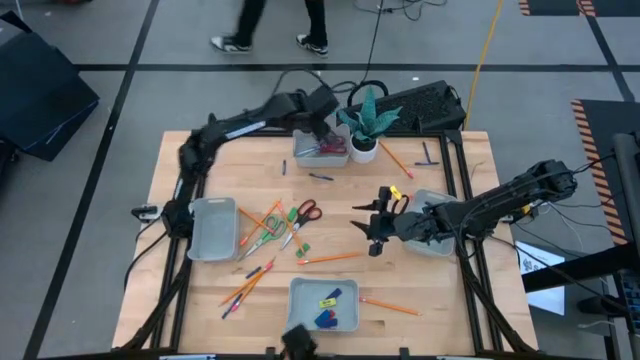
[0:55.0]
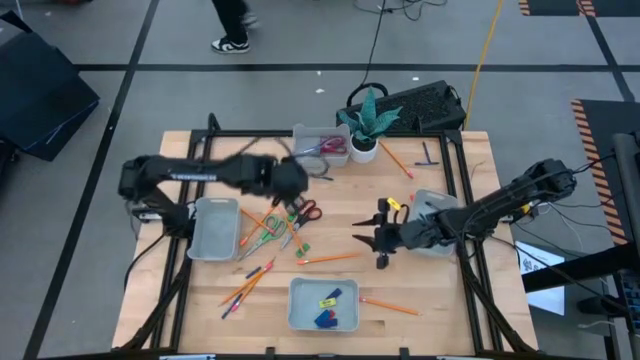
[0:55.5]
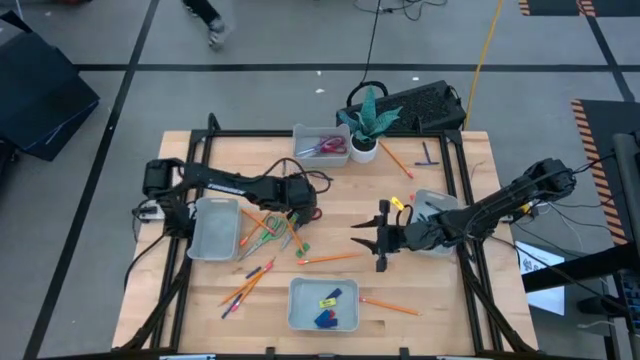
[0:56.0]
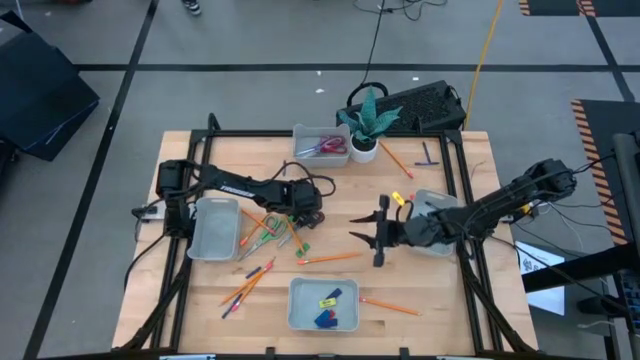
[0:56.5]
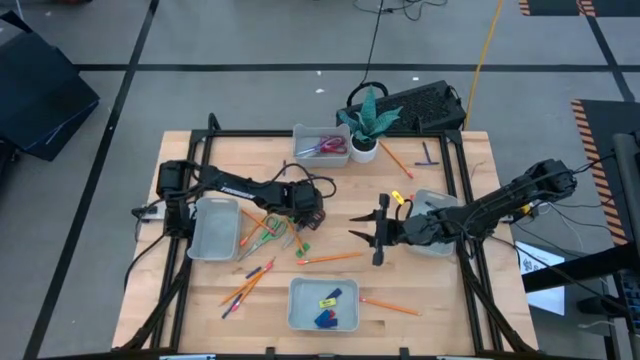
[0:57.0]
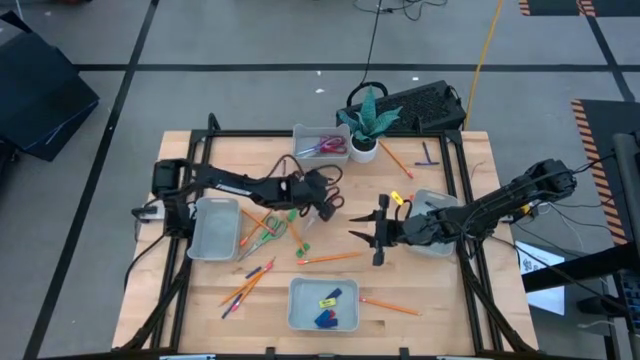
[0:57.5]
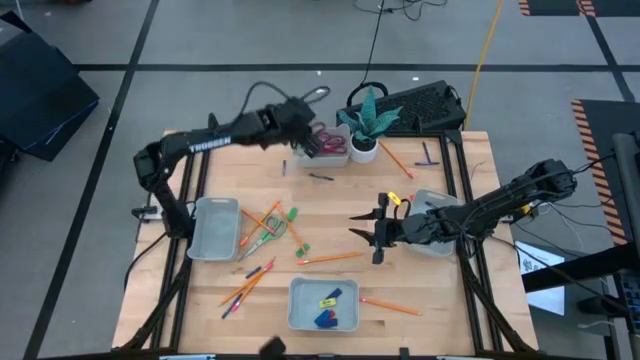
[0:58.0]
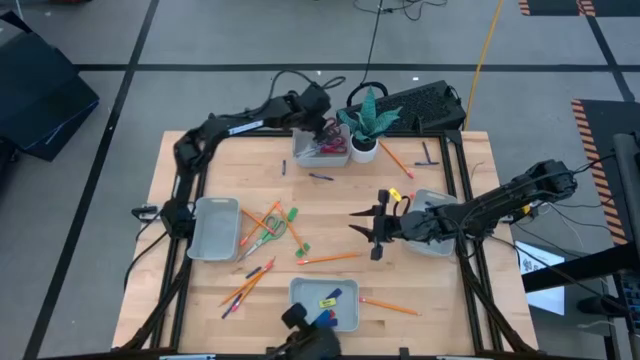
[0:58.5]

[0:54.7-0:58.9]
Task: Sort crayons/erasers/pens/pencils in bins
Put the black scissors into the top gray bin

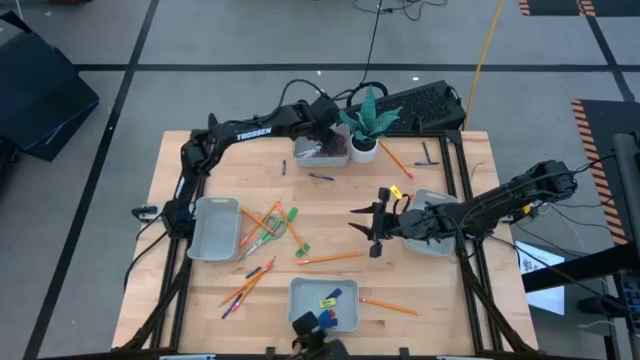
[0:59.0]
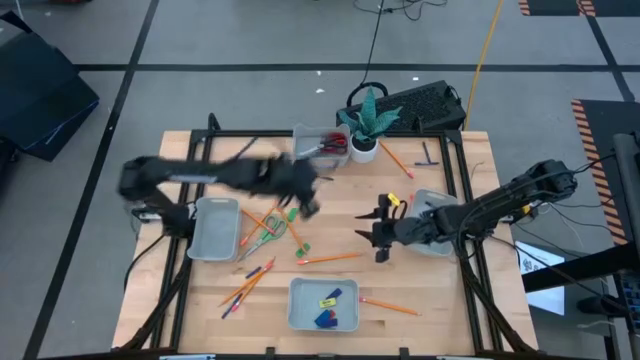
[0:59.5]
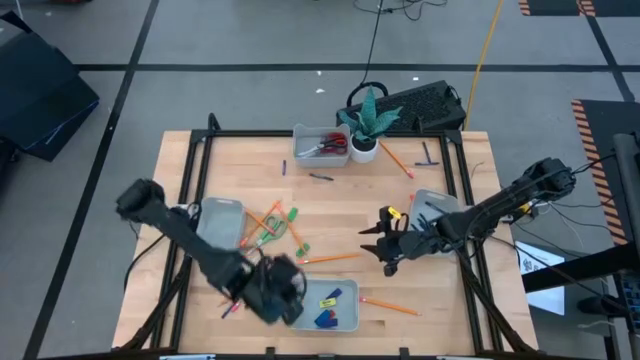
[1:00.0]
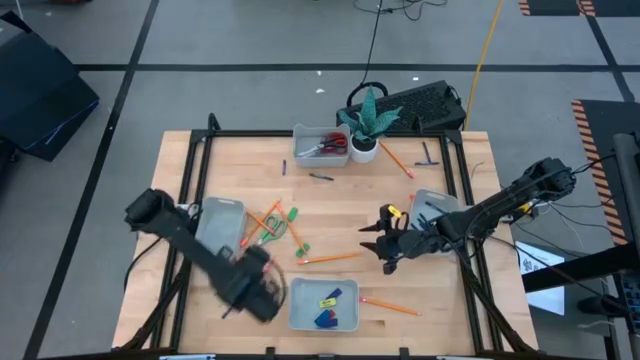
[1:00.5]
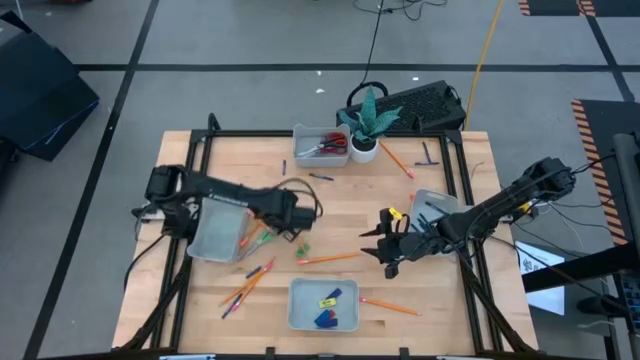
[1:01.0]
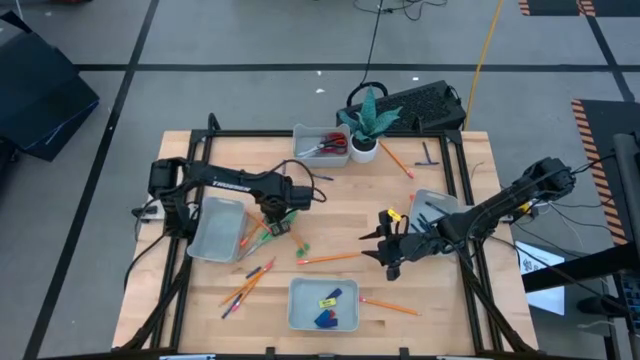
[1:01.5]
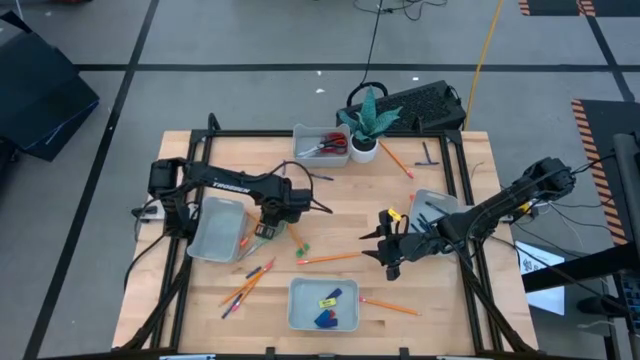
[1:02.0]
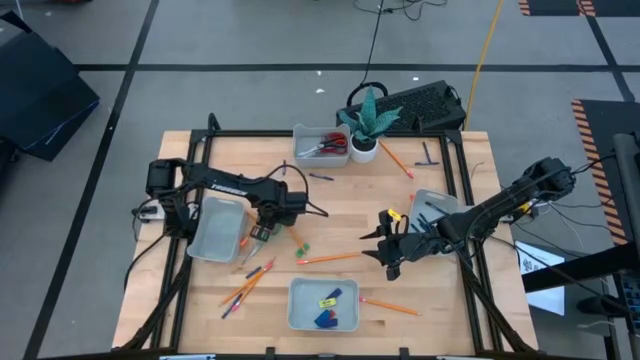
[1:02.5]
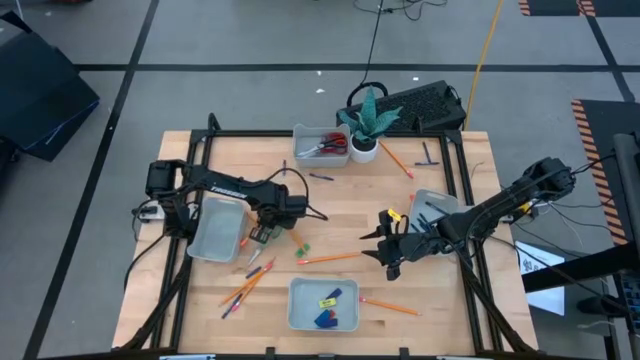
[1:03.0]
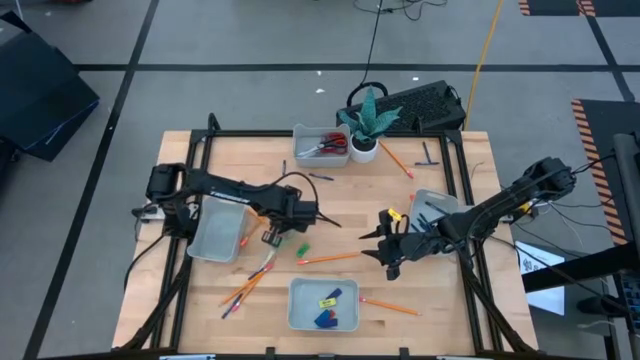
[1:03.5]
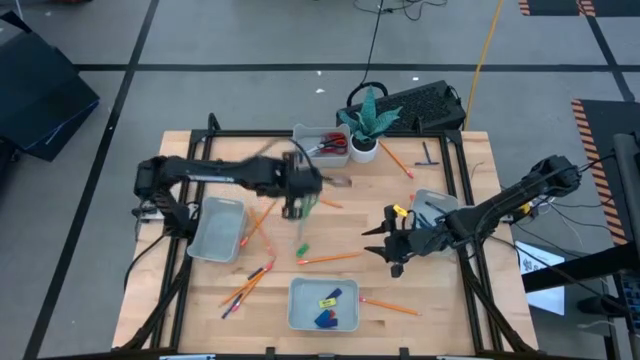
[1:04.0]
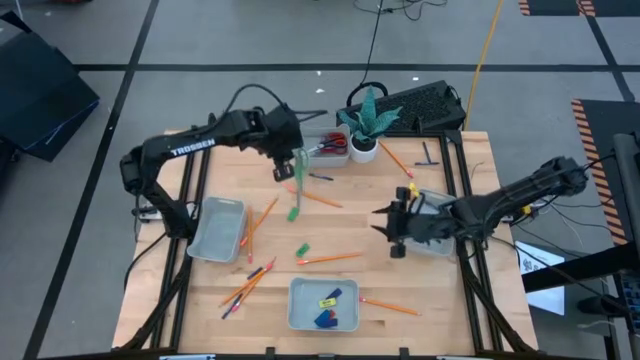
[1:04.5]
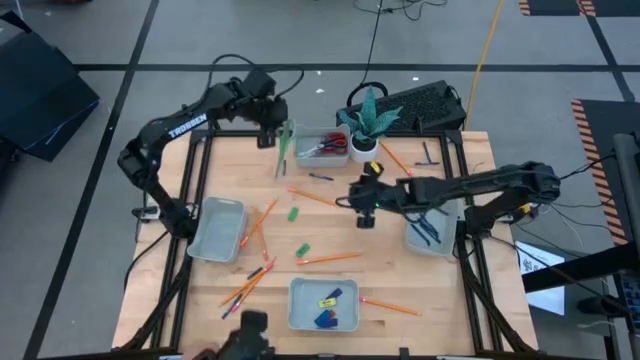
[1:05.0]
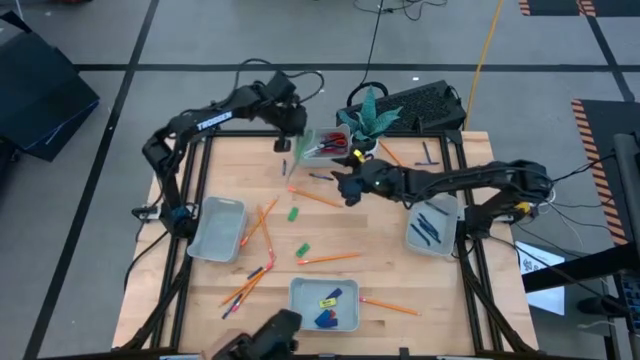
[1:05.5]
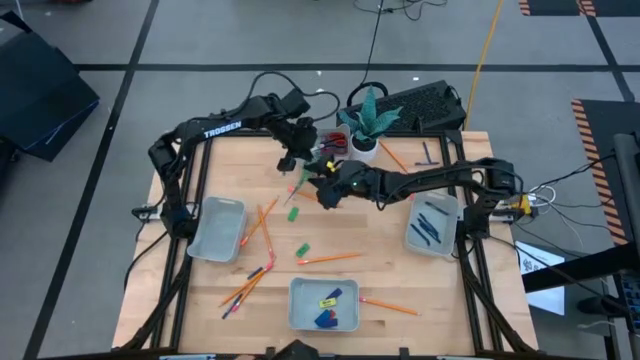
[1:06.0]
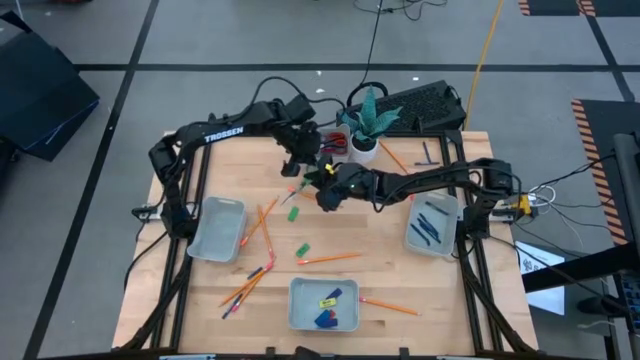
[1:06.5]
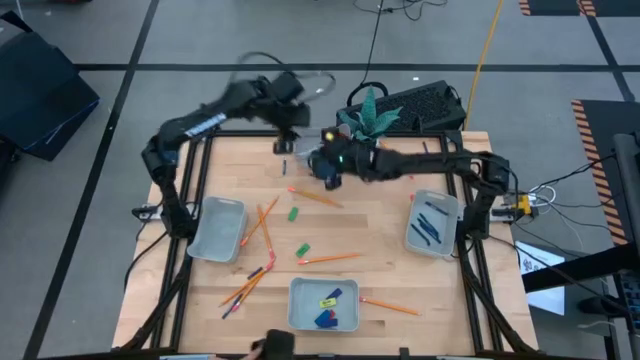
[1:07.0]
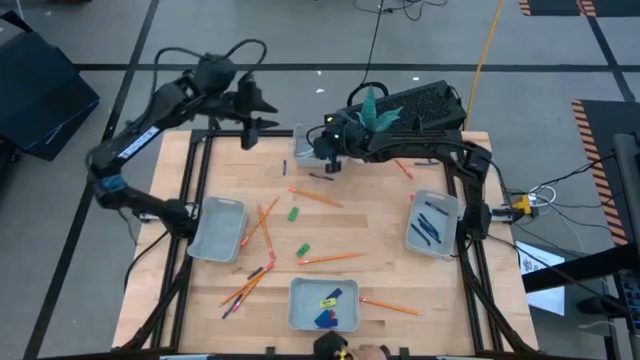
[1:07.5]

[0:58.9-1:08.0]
Put the green scissors into the top gray bin

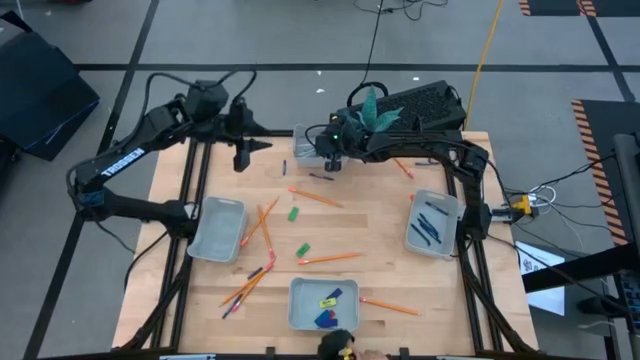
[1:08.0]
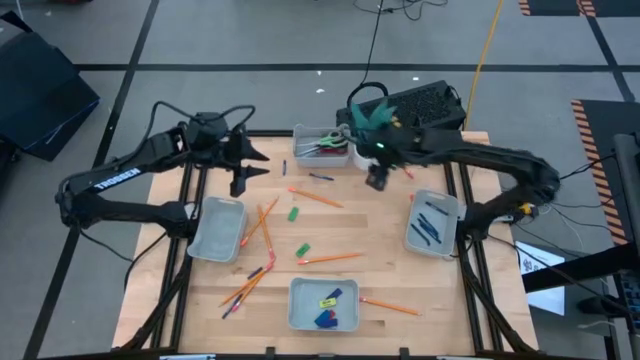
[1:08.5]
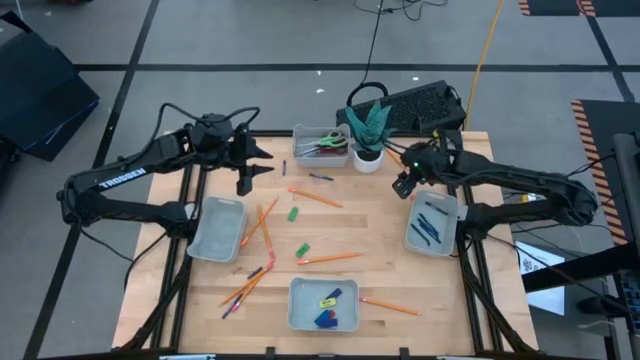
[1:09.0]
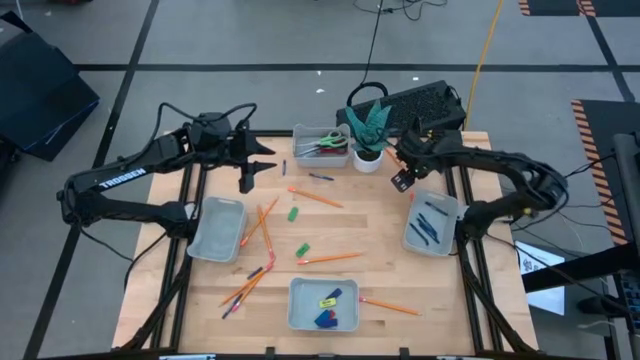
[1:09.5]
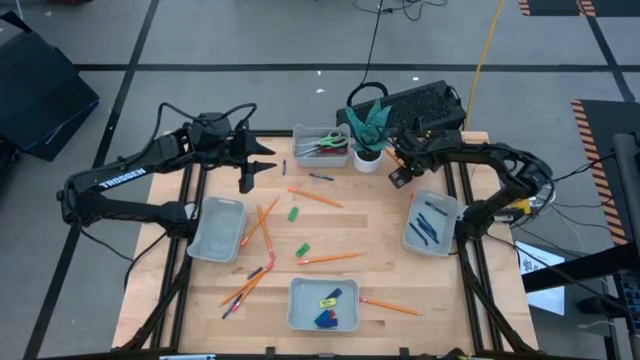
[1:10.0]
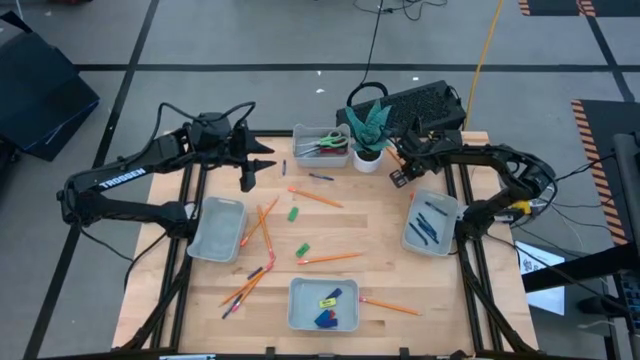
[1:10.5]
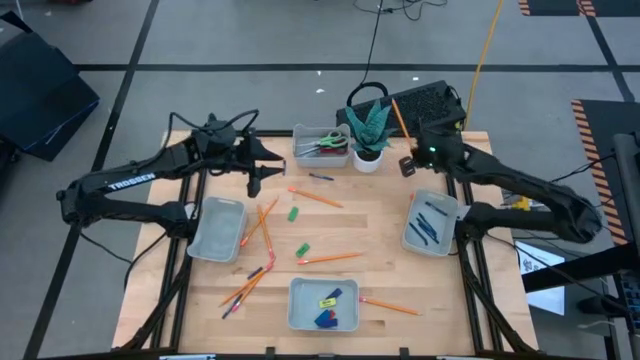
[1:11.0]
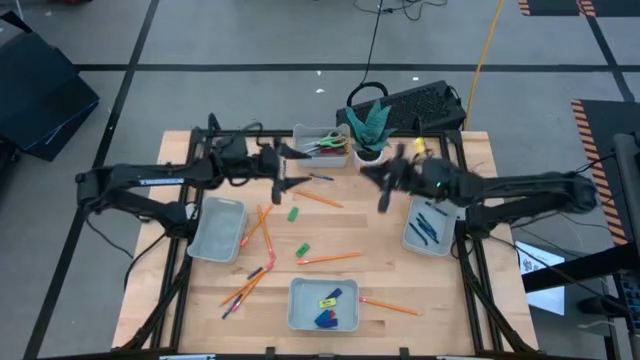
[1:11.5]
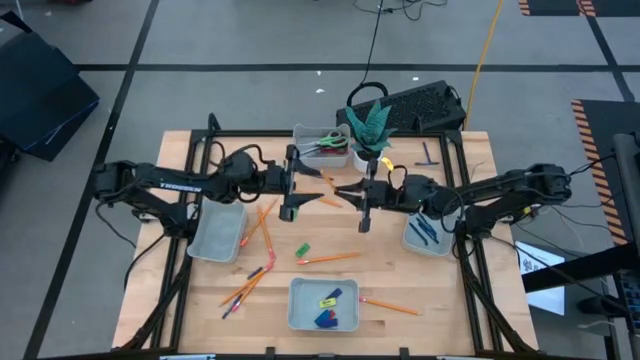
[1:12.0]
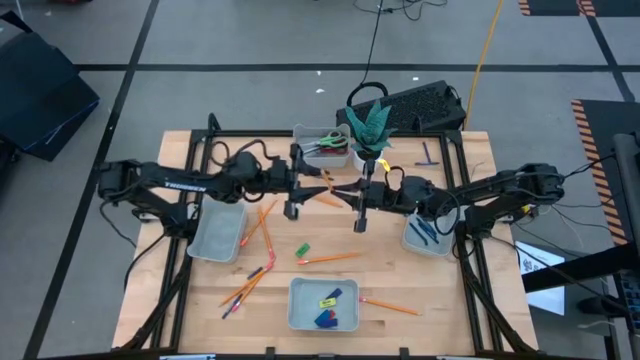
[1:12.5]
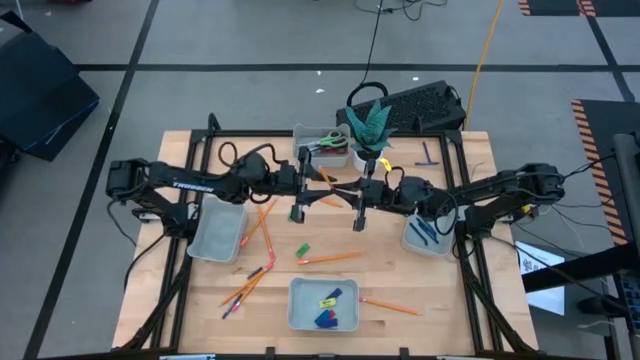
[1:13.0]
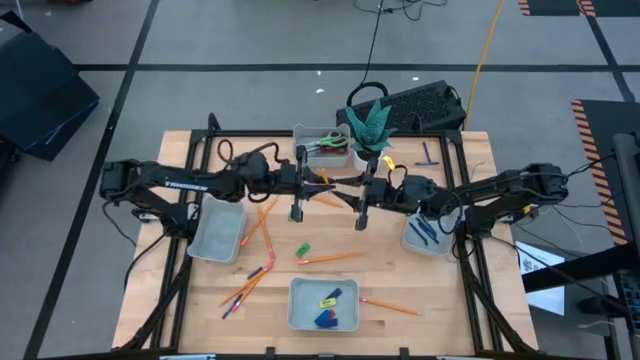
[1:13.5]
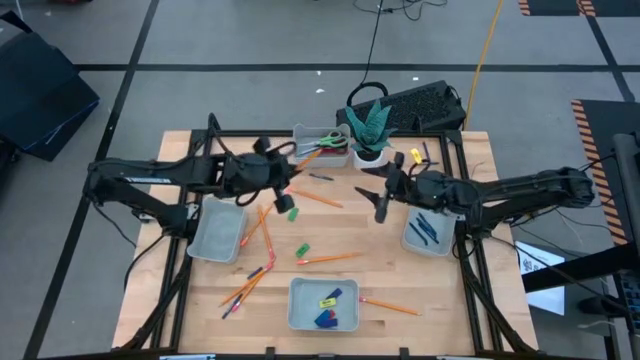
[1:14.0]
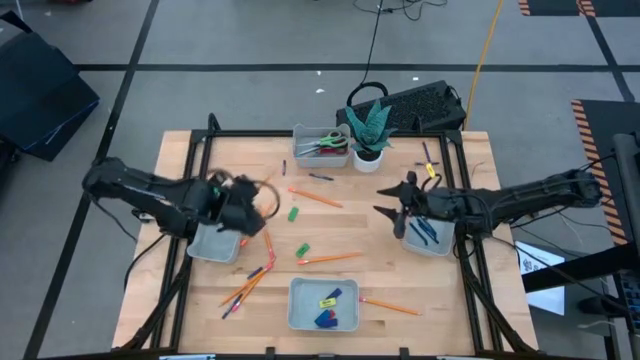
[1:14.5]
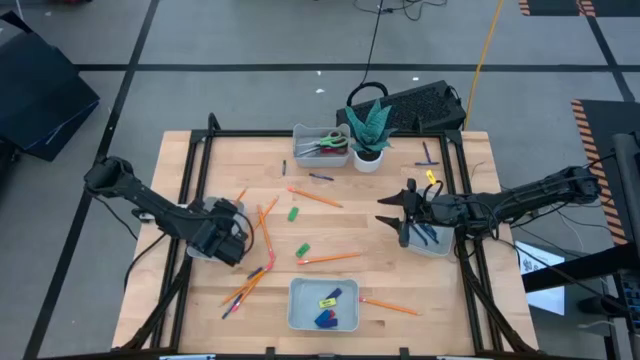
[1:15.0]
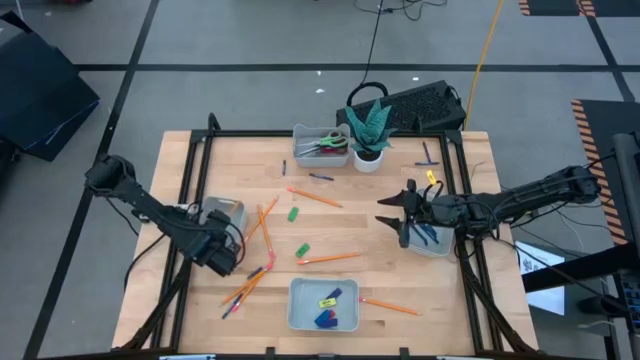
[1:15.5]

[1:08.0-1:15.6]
Put the orange pencil into the middle left gray bin

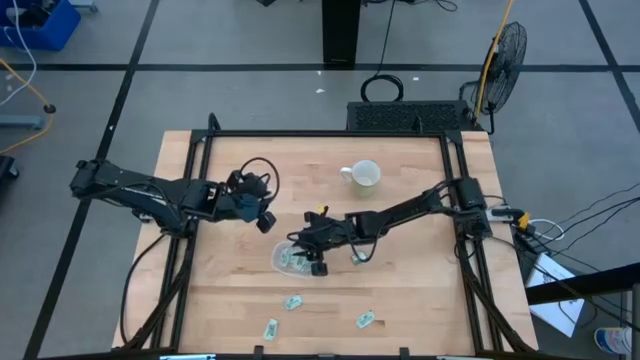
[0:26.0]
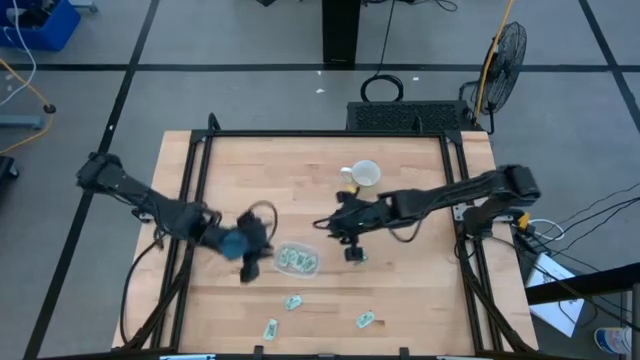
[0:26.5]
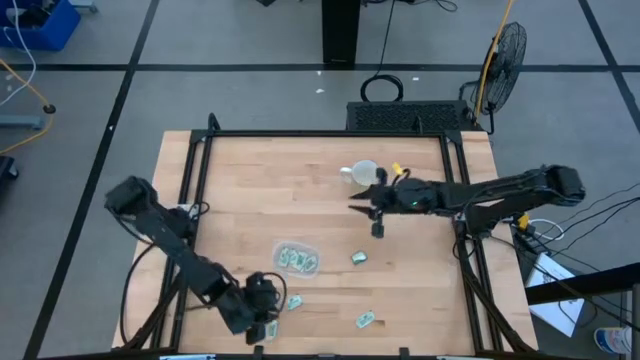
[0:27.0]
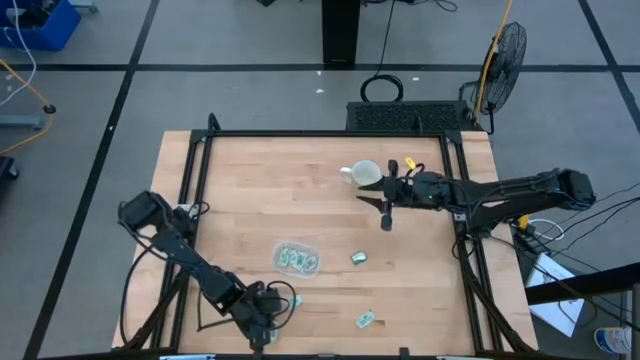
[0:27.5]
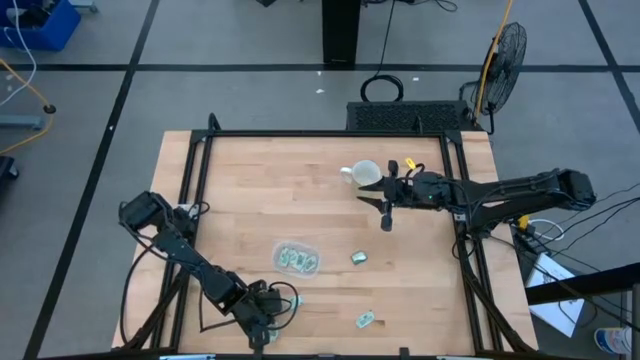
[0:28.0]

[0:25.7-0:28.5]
Task: Pick and place Stevia / Truvia into bins
Put the light green stevia packet into the transparent bin
